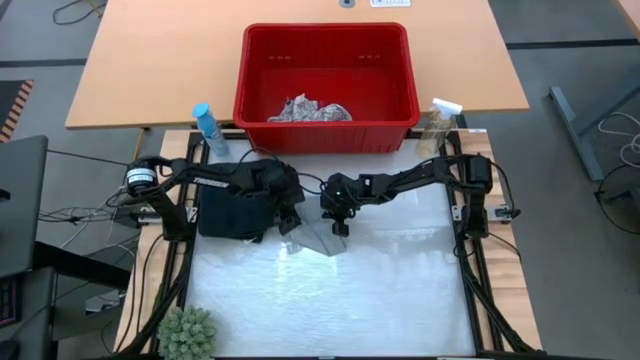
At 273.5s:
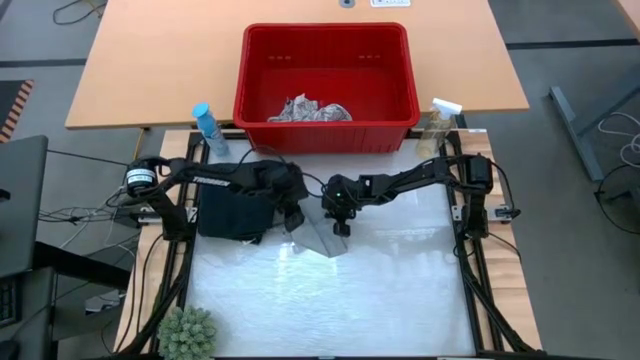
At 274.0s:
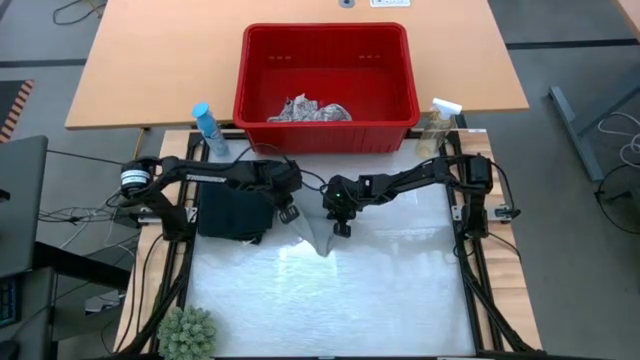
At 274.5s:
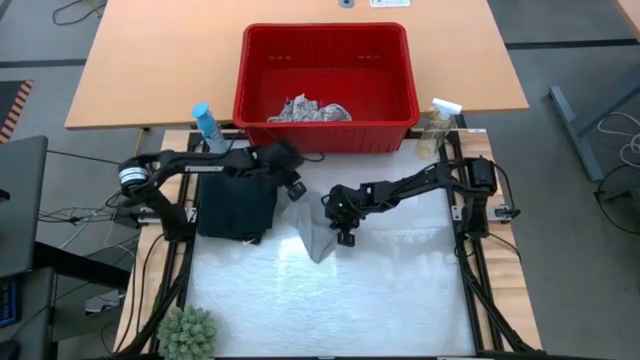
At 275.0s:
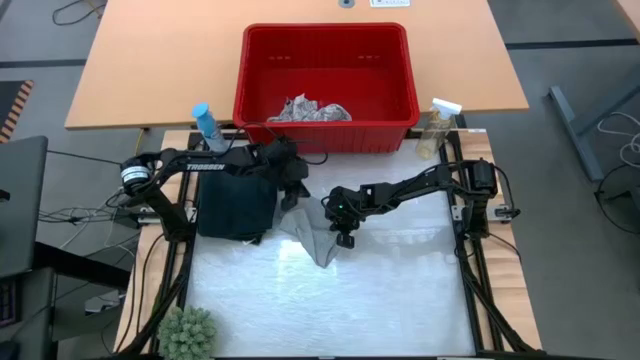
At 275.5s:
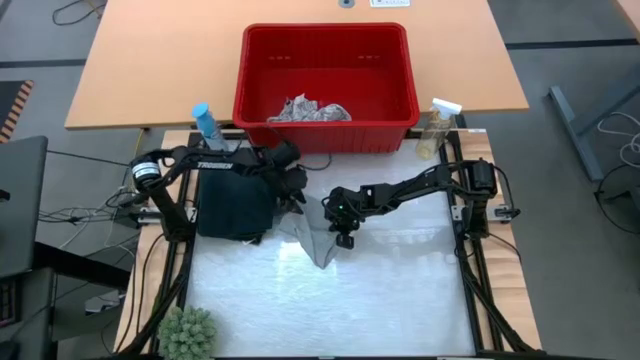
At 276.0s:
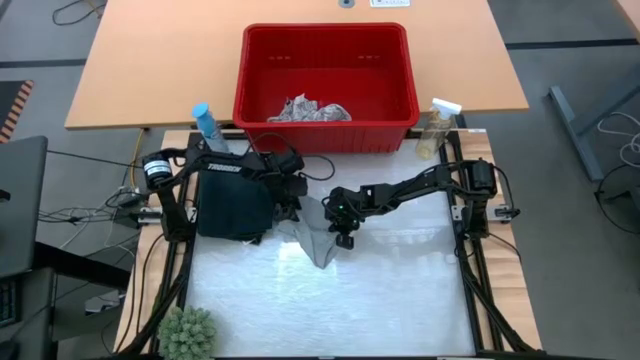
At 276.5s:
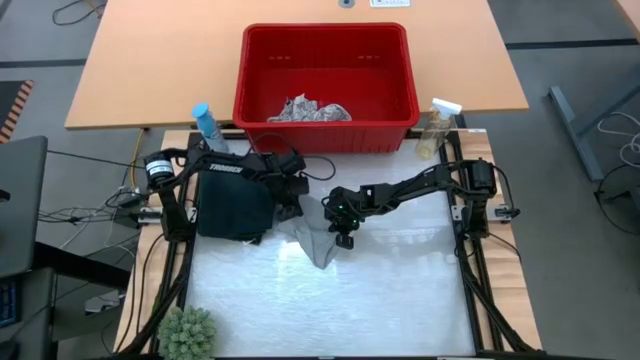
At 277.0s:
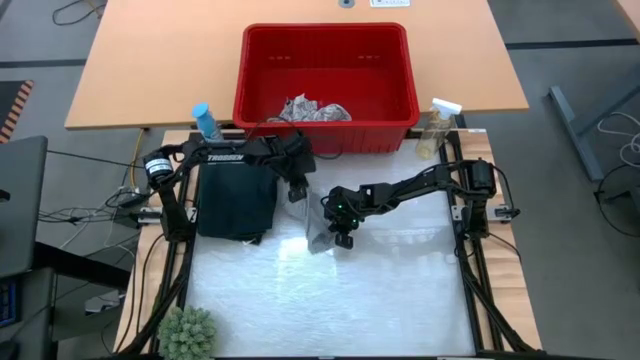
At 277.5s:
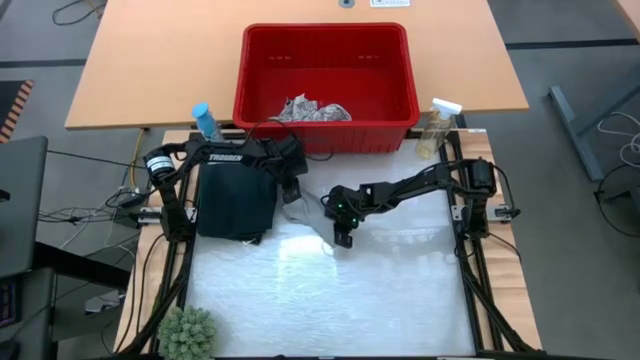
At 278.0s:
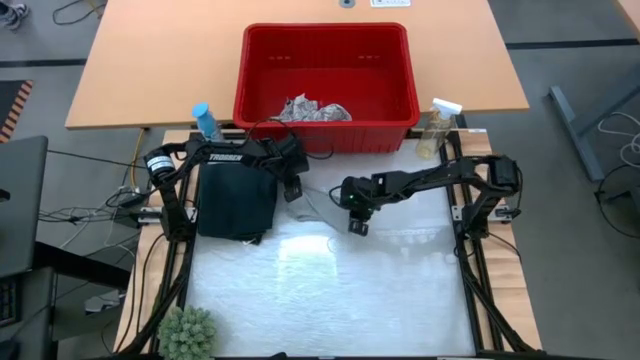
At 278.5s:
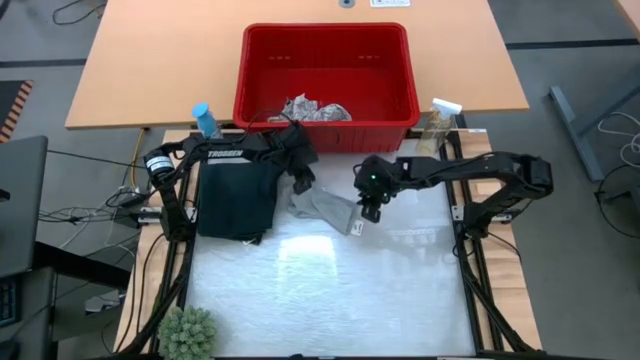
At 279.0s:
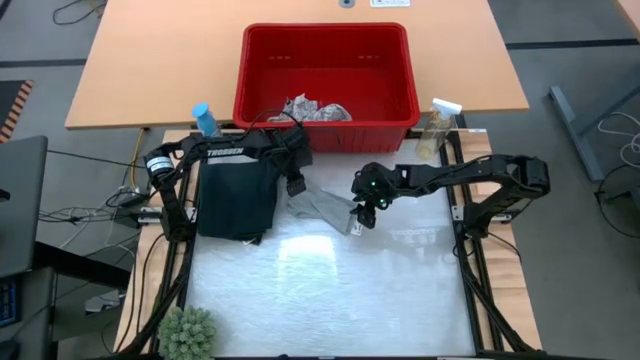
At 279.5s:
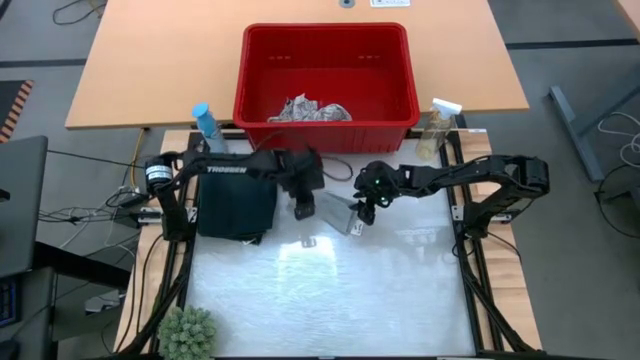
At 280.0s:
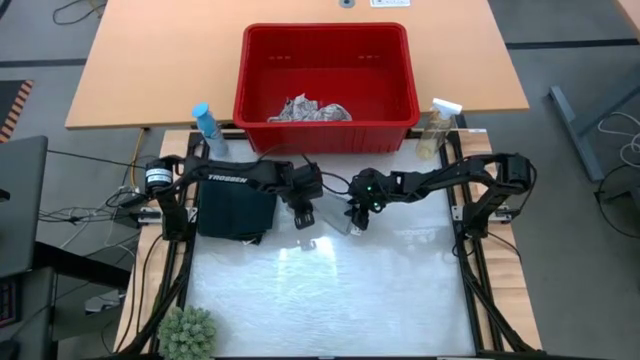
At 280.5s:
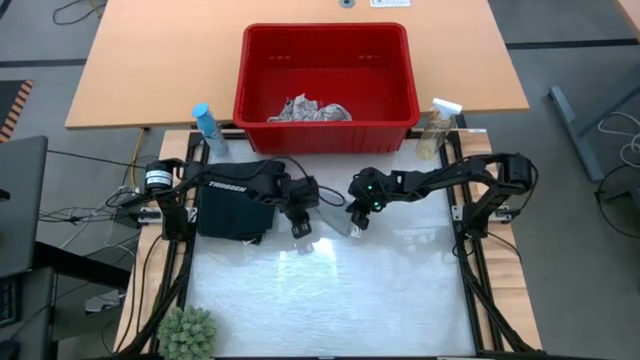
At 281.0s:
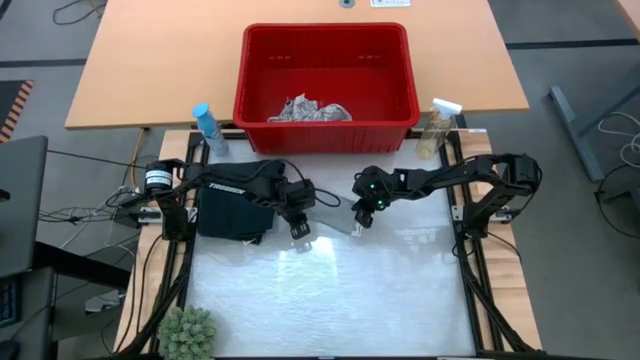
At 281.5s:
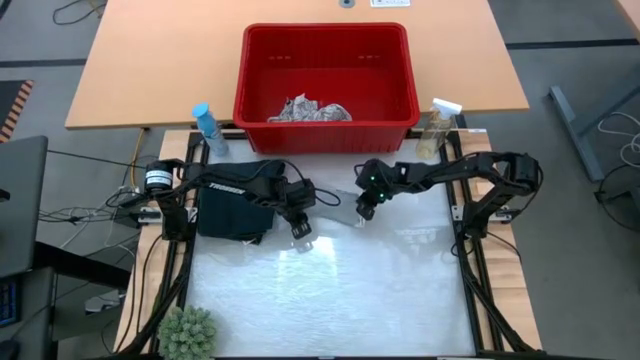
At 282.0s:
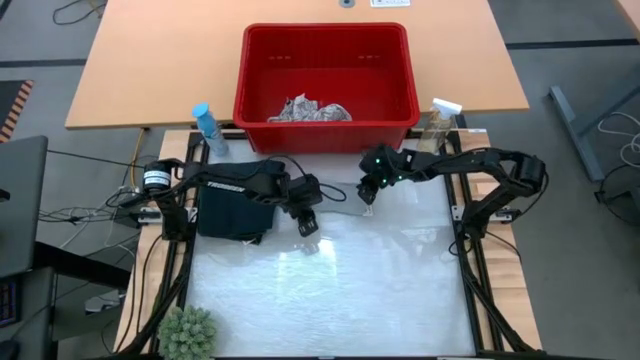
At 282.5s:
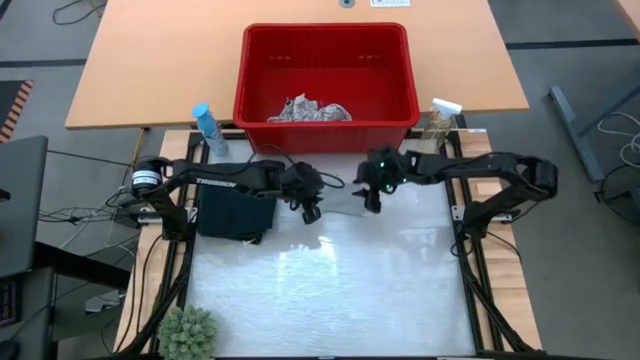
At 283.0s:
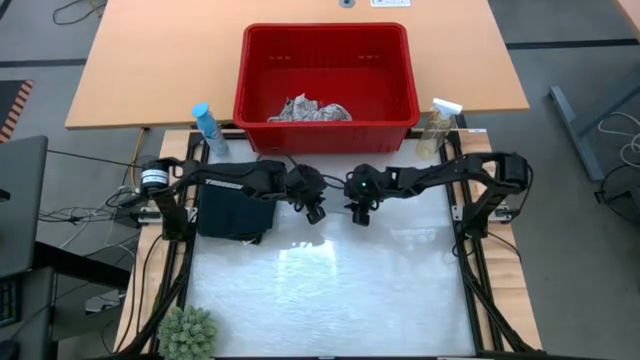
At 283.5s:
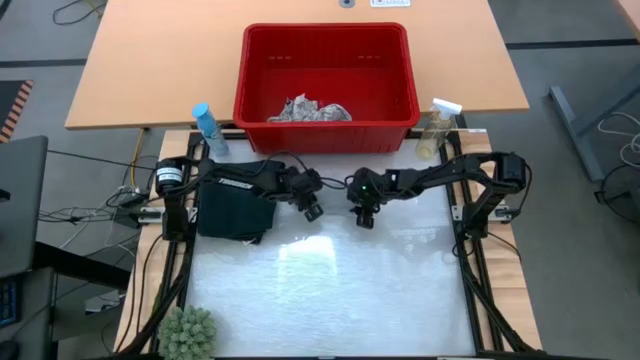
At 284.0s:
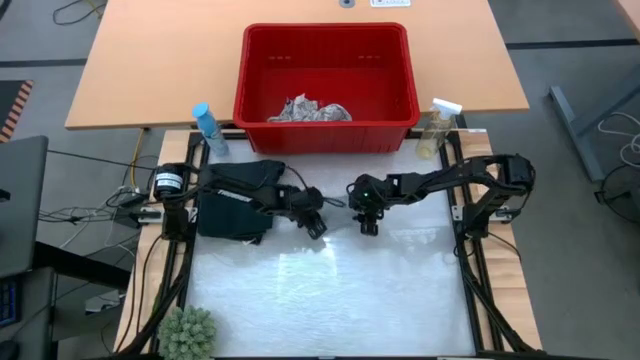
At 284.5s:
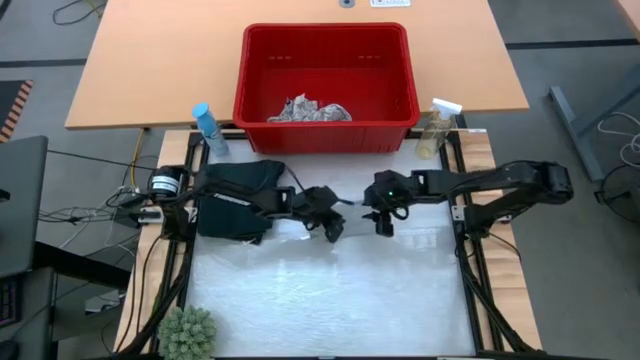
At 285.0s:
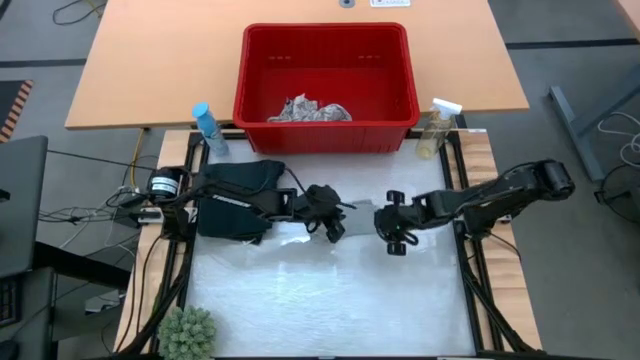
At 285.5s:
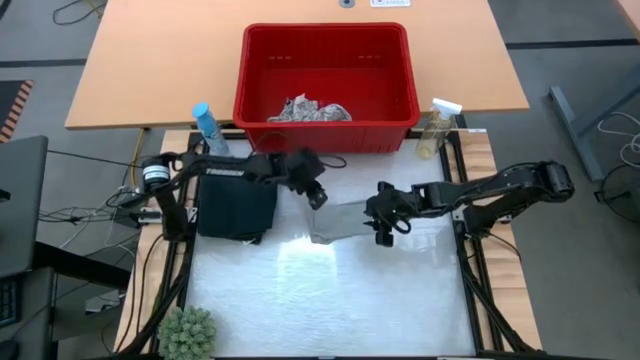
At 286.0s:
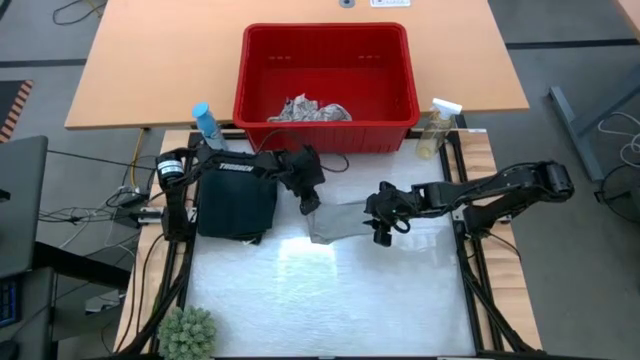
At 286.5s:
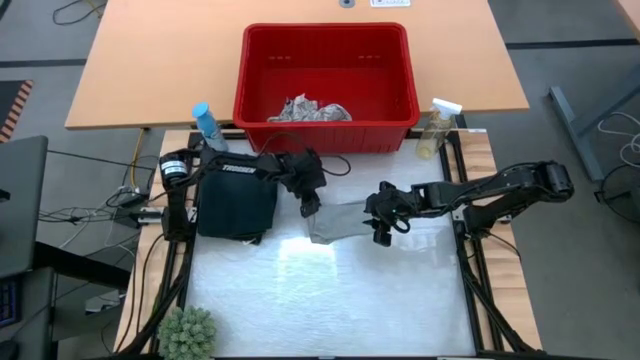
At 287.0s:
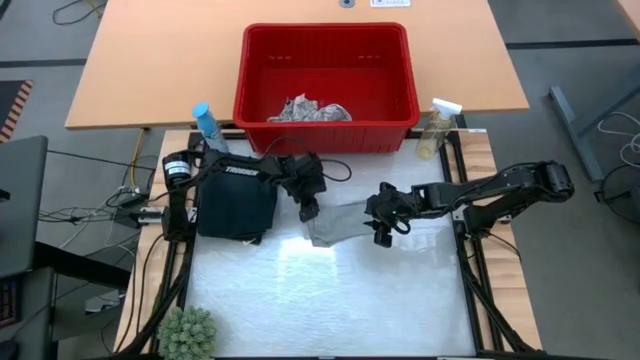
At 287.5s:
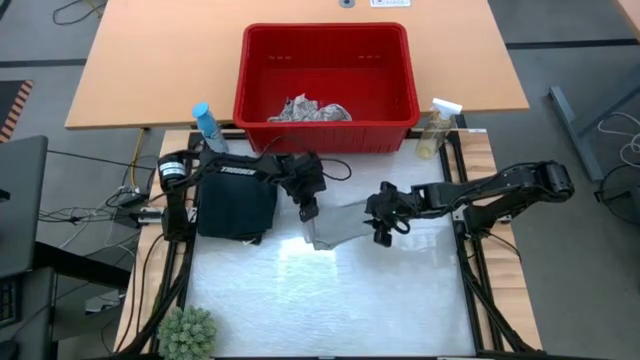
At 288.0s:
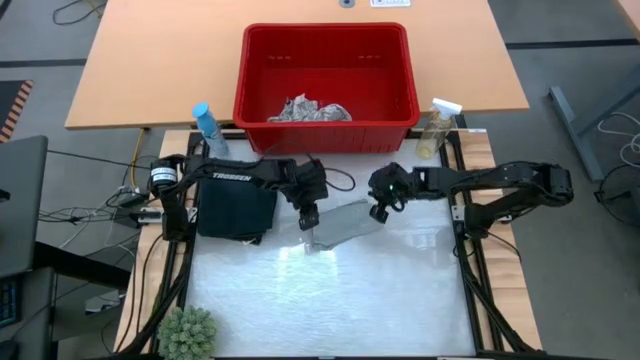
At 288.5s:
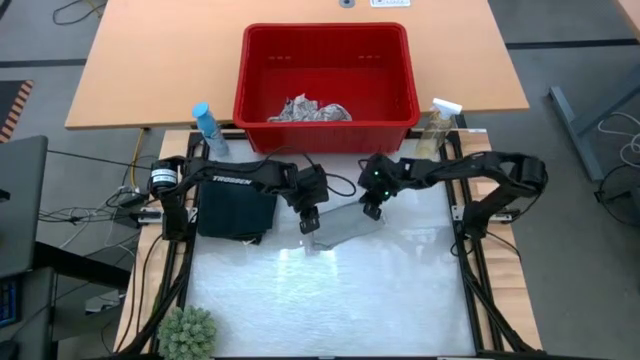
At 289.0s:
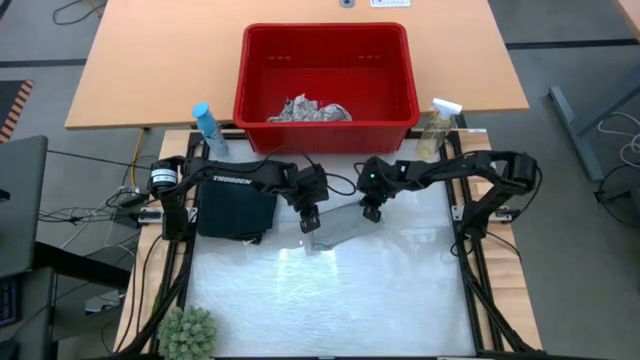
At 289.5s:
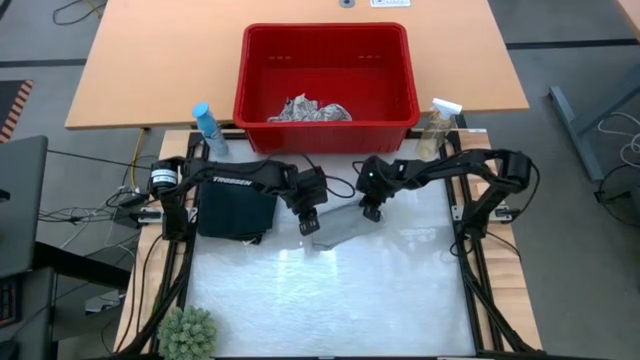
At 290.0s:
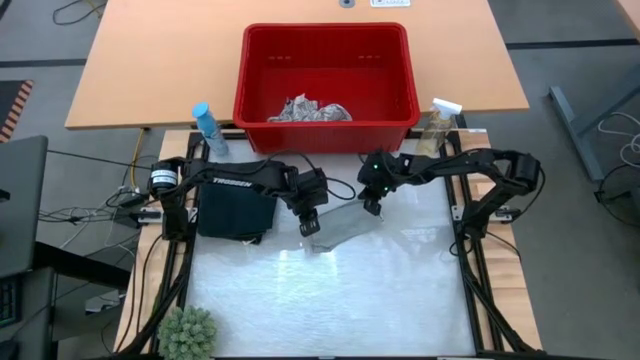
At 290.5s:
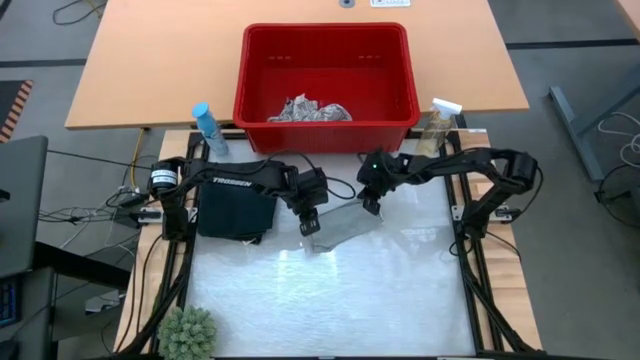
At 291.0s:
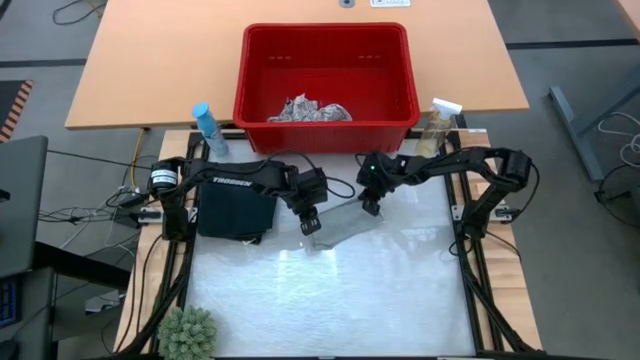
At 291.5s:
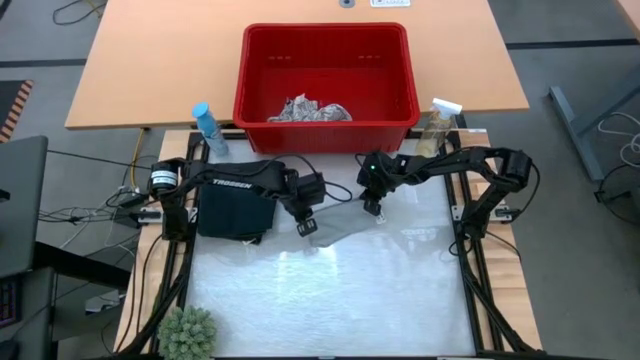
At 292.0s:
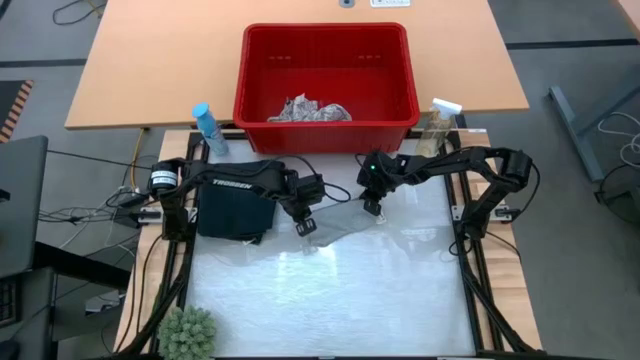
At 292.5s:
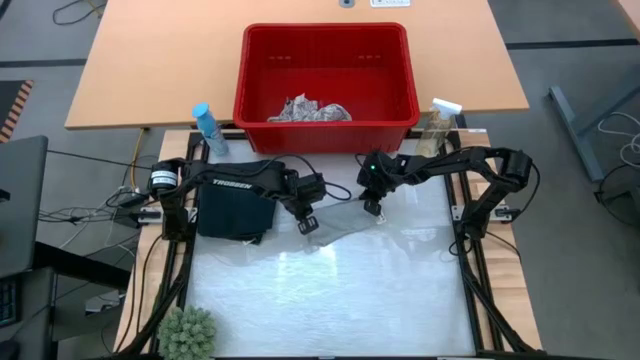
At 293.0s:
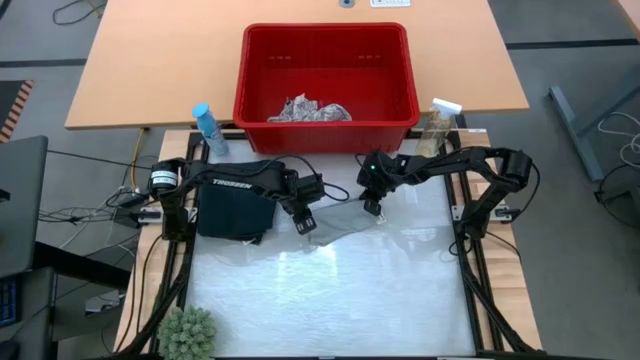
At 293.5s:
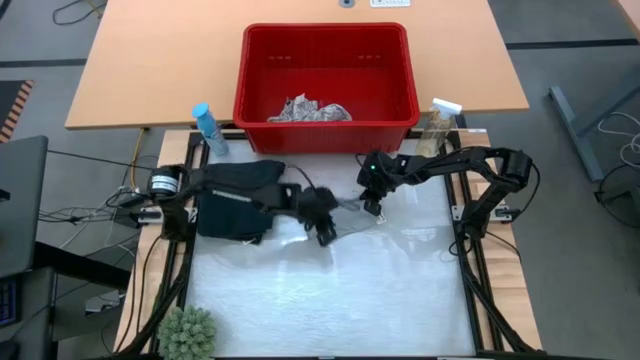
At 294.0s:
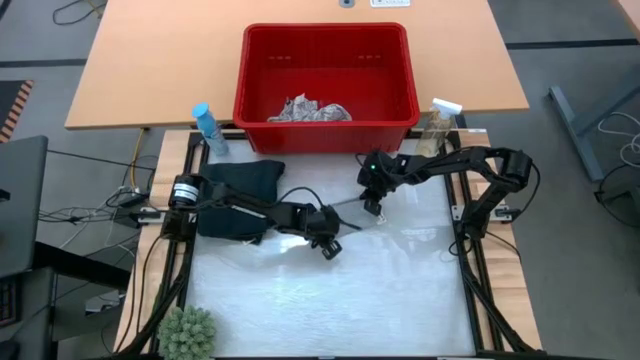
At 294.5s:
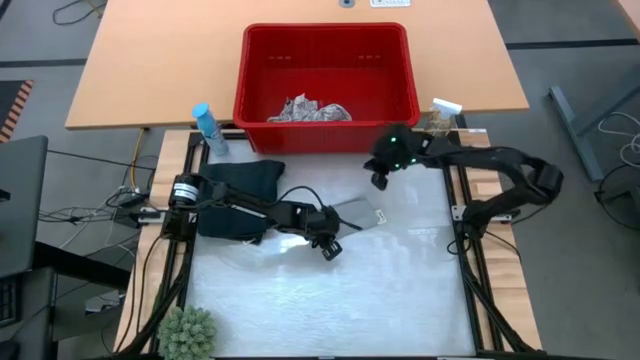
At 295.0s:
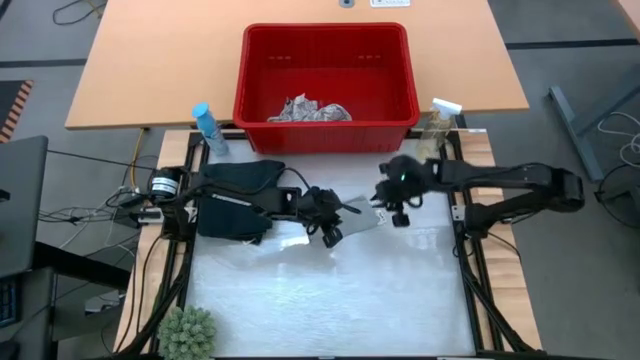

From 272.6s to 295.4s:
Task: Fold Laundry from Bin
Fold the gray shorts
